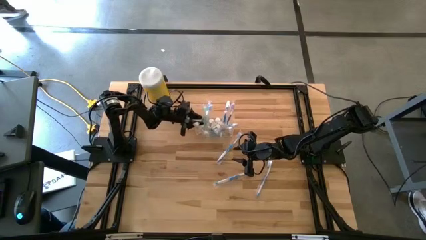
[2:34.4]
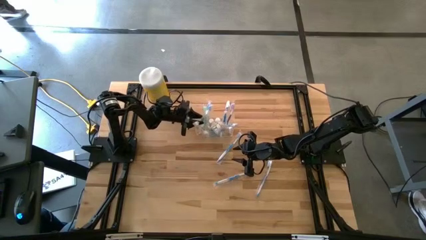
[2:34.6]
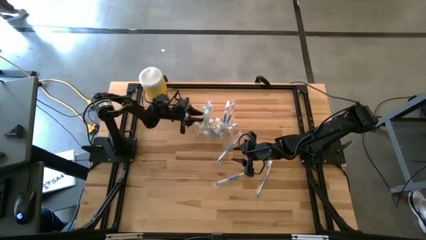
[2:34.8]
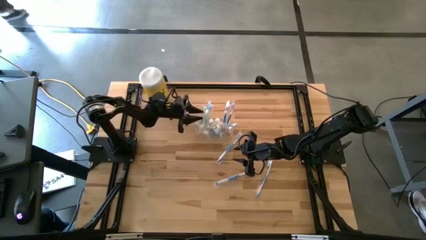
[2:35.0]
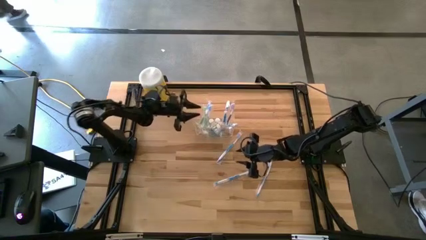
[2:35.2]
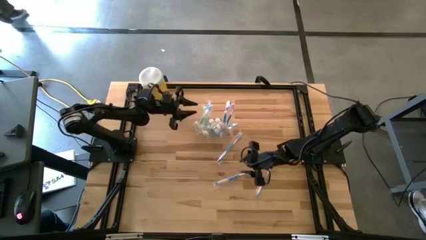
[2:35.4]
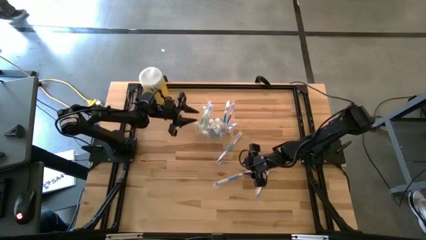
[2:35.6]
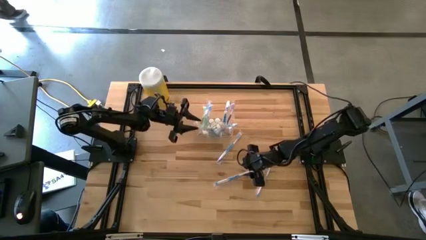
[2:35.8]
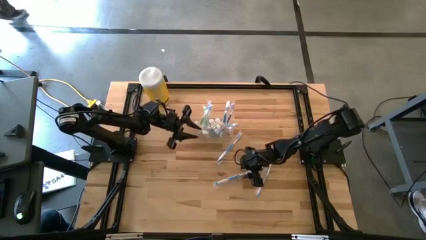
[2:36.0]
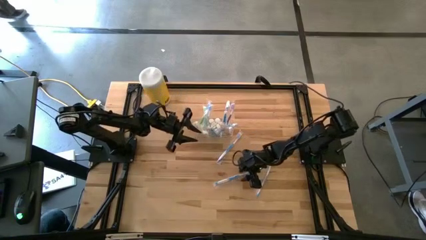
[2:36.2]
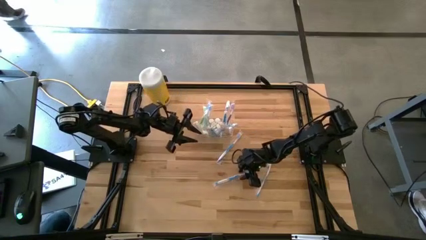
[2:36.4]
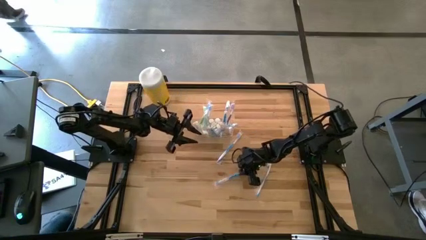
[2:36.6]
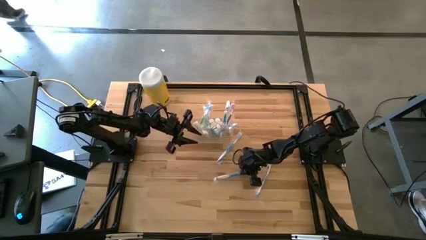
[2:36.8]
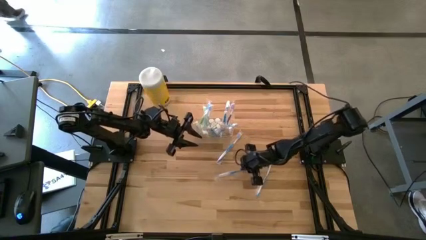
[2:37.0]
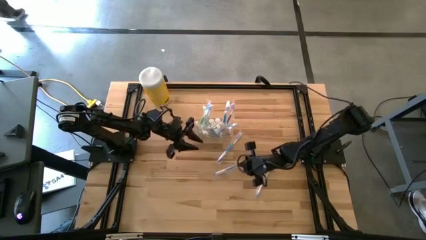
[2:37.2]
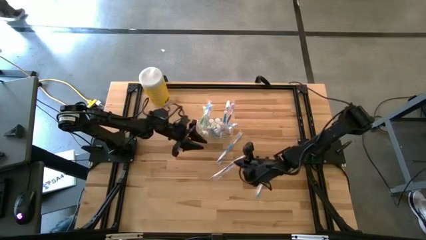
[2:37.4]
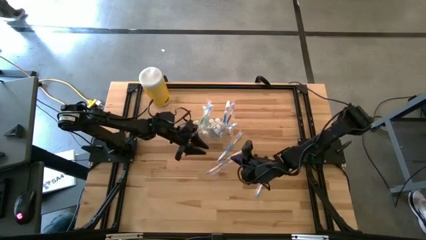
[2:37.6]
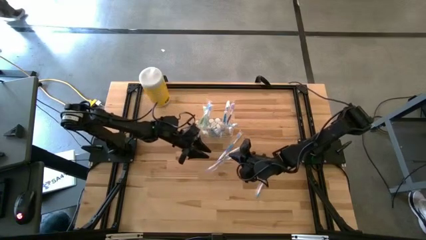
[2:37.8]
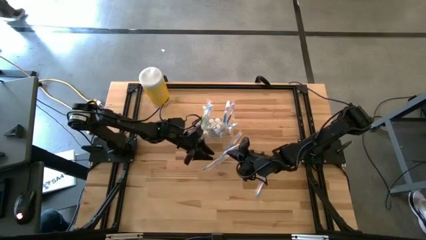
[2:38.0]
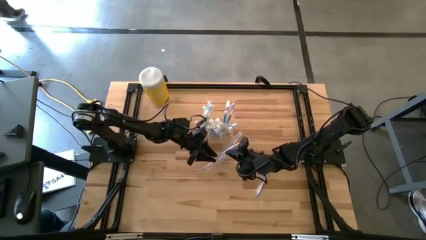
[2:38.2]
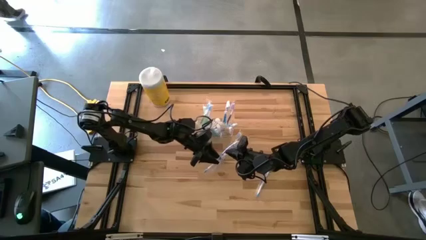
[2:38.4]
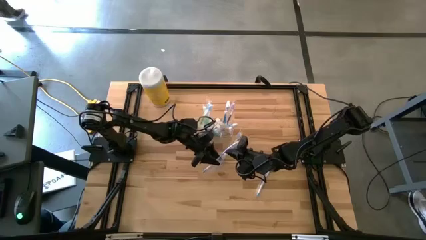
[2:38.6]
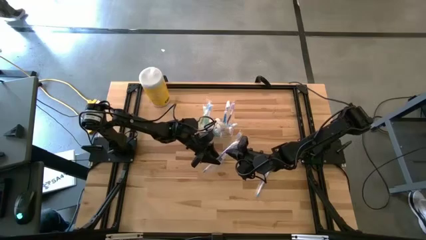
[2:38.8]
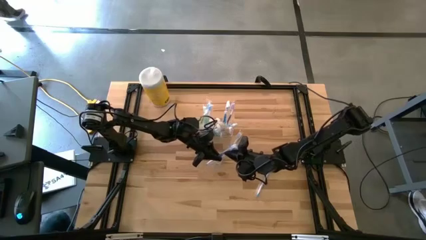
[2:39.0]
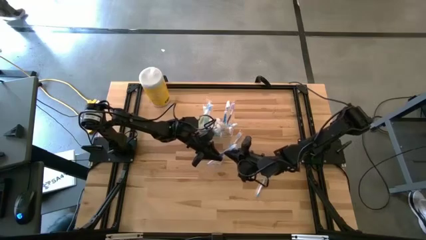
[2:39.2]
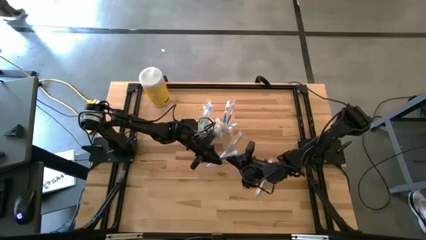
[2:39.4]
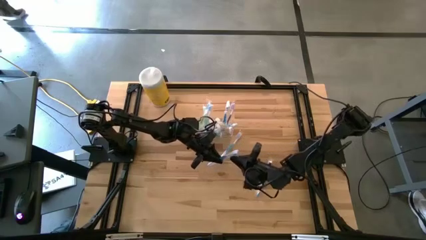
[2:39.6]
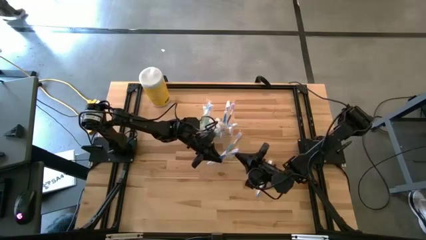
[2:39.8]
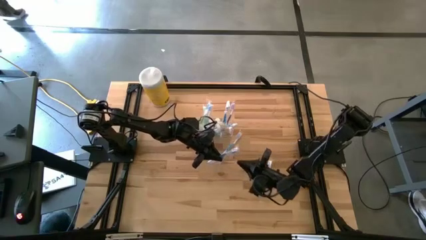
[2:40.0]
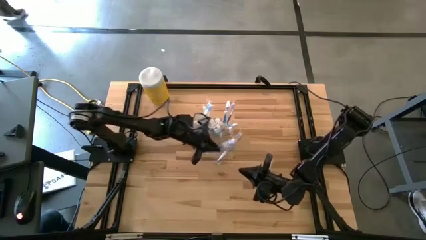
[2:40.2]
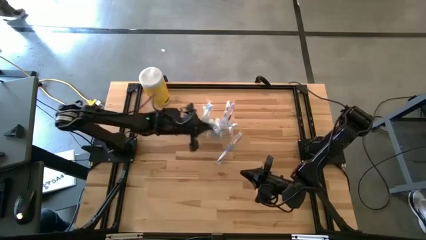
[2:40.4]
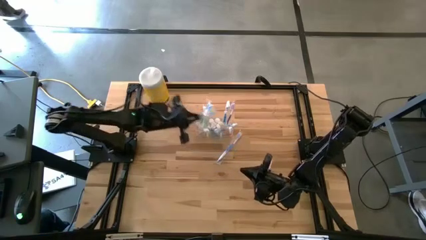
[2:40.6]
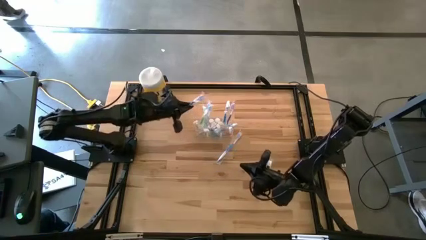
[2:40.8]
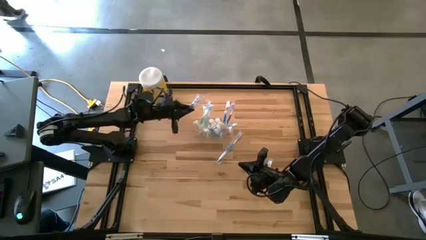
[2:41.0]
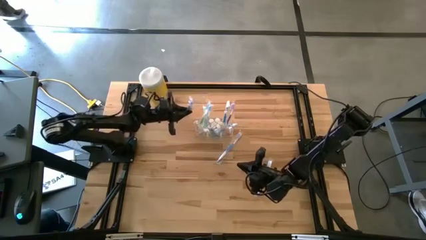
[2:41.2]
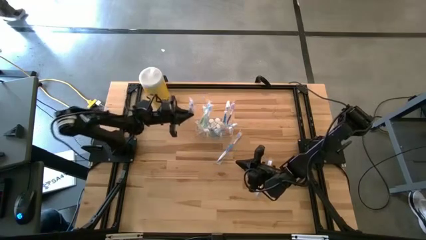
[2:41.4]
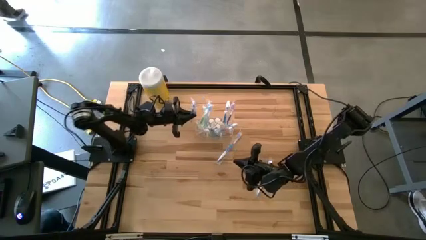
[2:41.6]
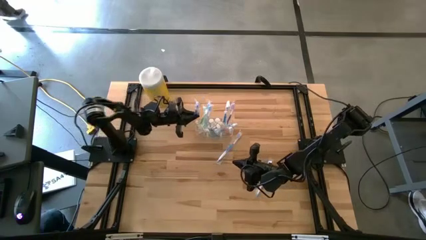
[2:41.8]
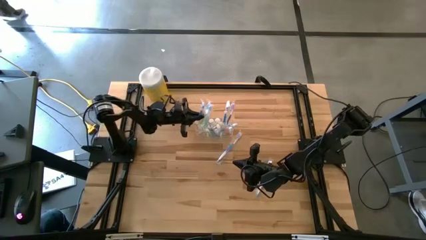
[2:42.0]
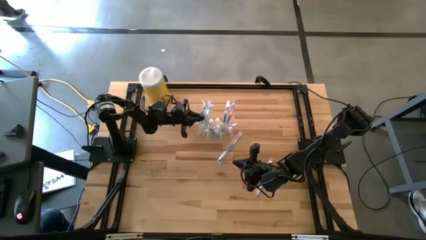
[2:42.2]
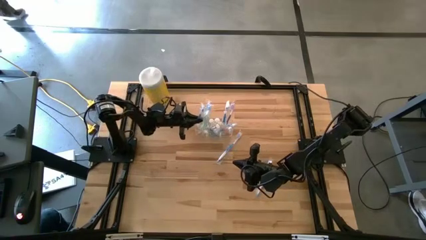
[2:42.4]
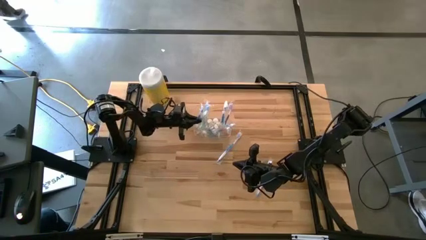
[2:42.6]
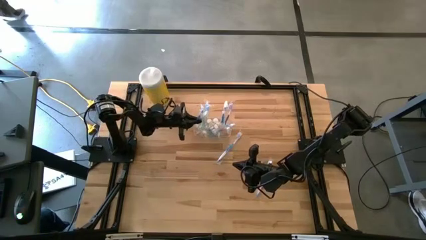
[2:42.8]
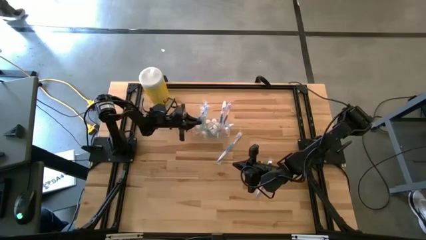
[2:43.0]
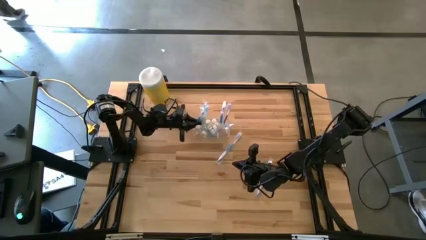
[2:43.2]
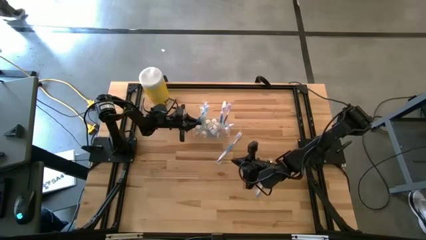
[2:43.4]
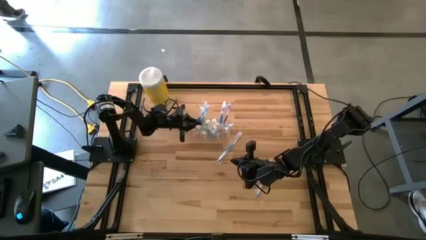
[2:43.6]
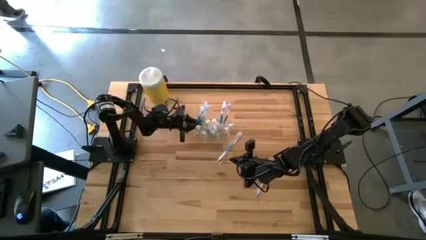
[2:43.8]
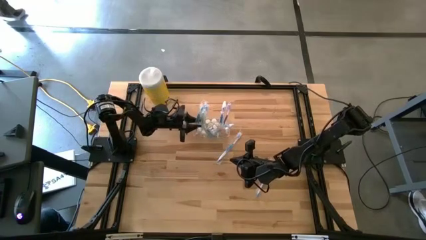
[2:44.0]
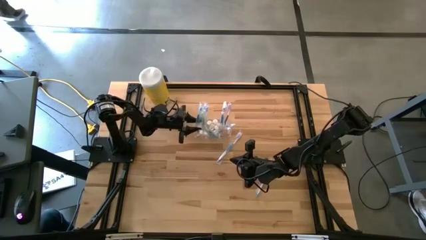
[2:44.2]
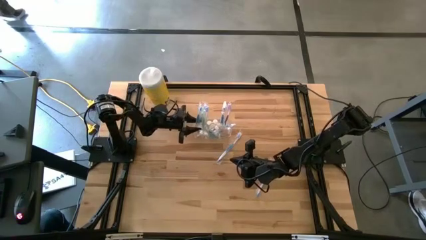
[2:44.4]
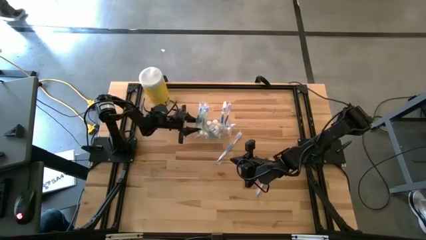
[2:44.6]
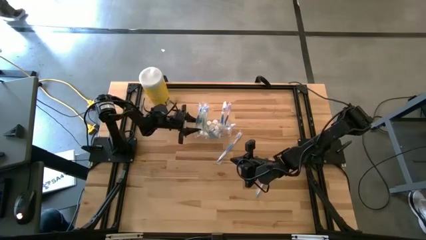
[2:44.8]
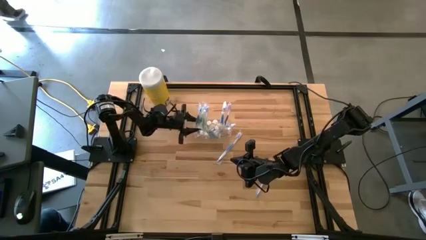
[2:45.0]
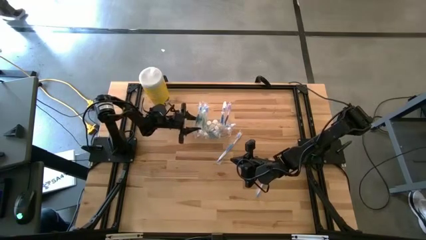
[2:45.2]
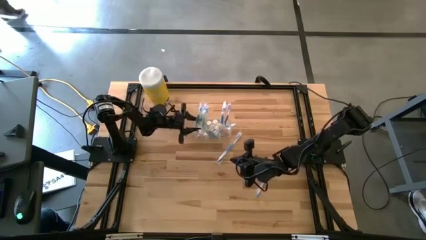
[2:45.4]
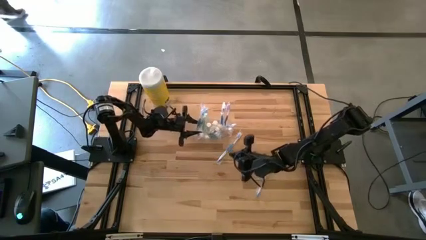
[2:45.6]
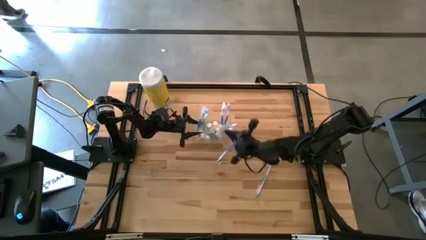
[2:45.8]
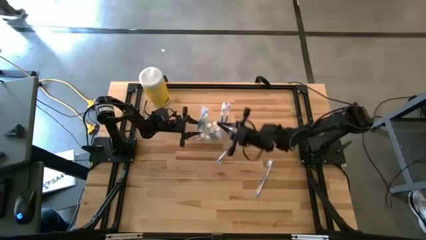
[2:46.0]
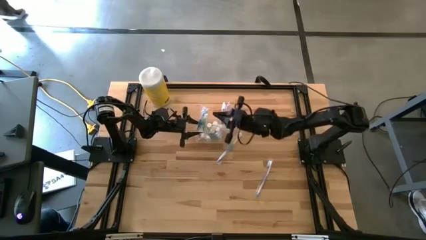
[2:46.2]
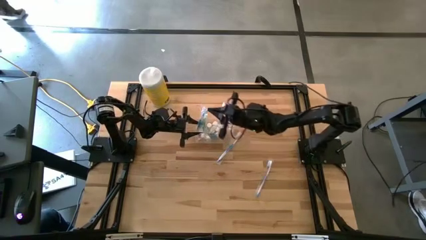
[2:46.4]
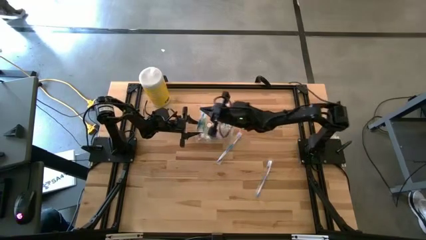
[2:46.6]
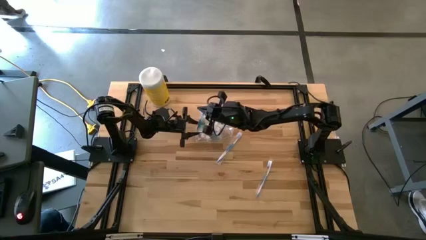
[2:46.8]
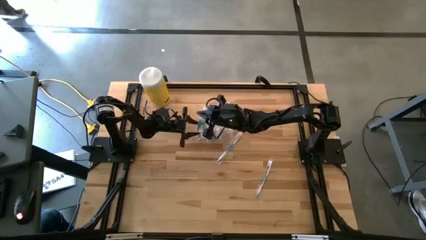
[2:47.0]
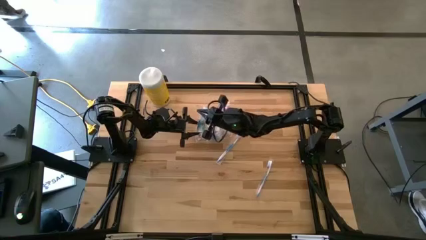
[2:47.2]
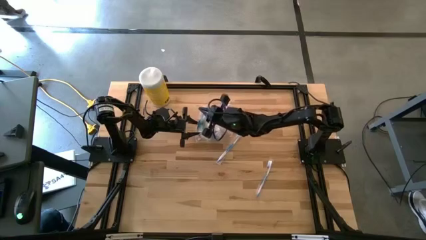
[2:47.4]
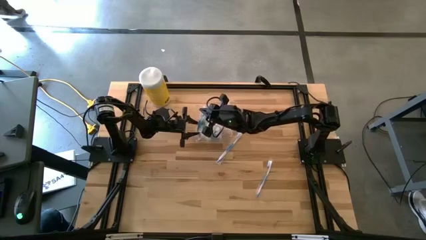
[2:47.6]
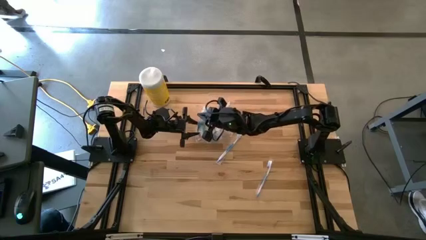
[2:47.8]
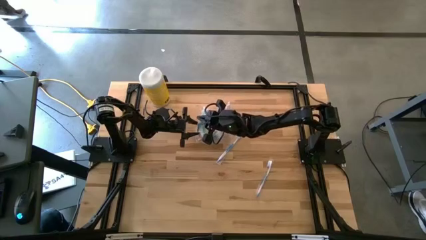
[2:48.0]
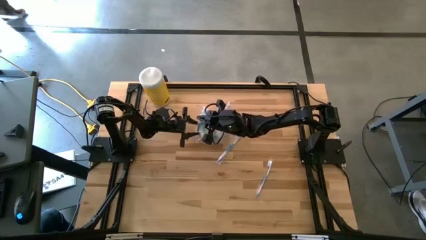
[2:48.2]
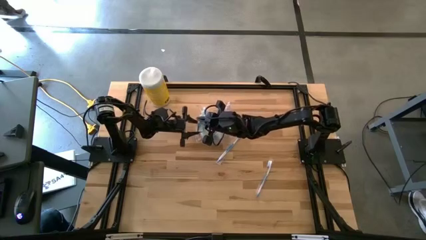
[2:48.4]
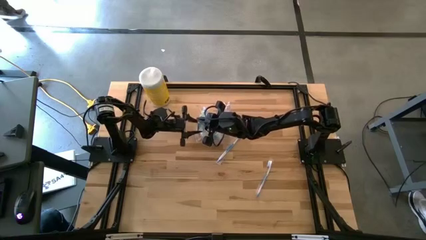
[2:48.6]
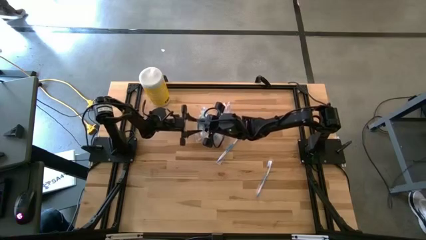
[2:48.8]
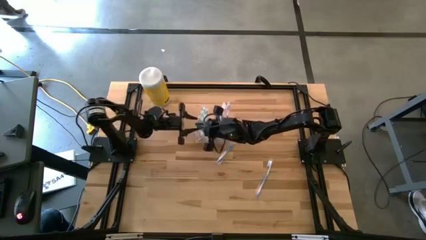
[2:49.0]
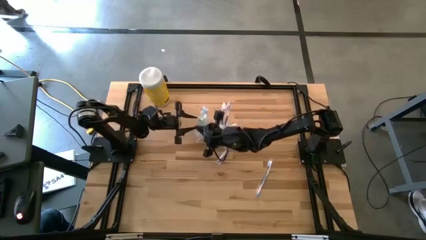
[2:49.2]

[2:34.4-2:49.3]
Task: Pick & Place toothbrushing station
Put the blue toothbrush into the transparent organizer

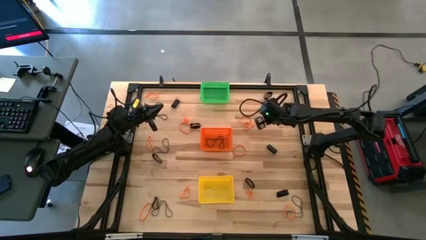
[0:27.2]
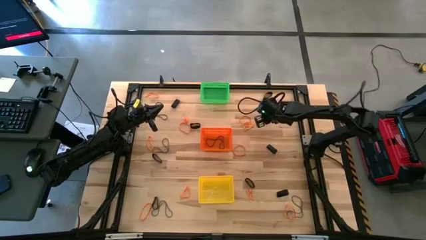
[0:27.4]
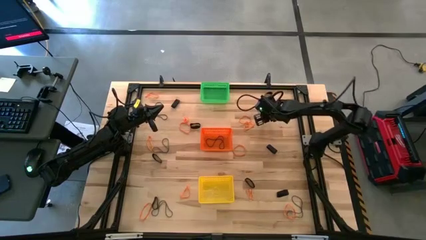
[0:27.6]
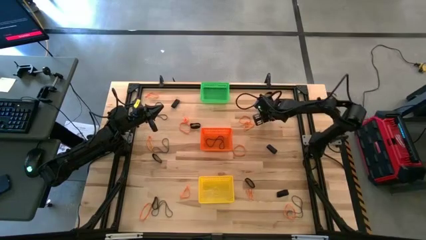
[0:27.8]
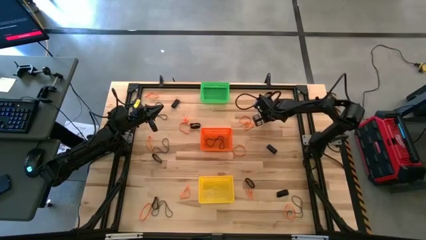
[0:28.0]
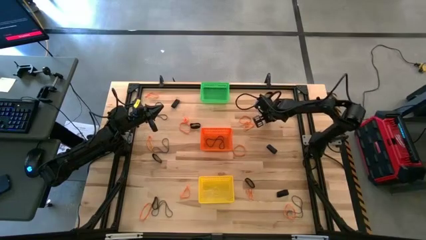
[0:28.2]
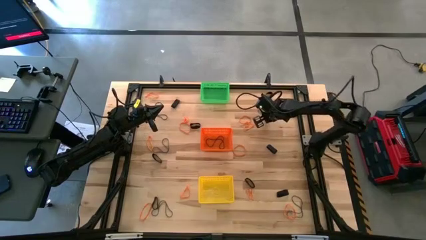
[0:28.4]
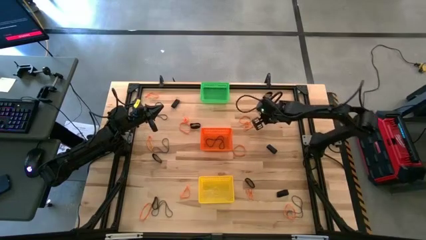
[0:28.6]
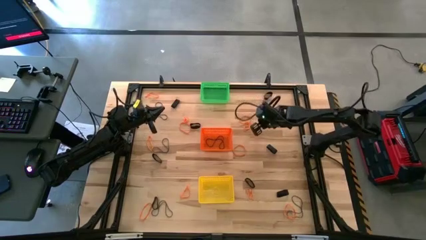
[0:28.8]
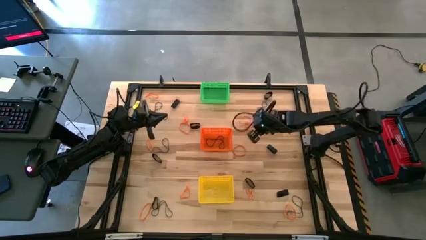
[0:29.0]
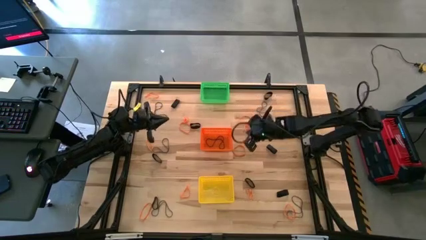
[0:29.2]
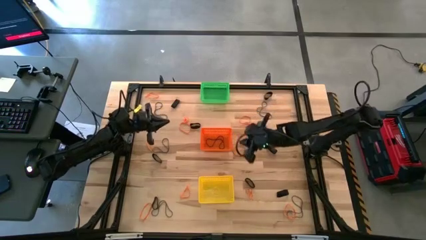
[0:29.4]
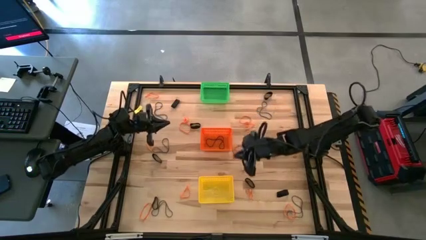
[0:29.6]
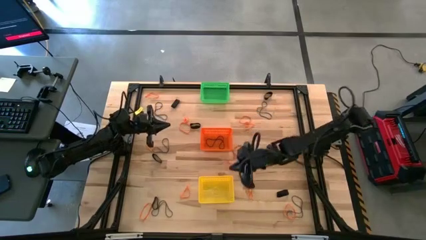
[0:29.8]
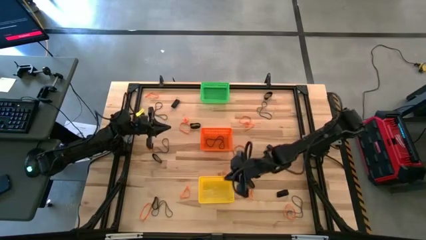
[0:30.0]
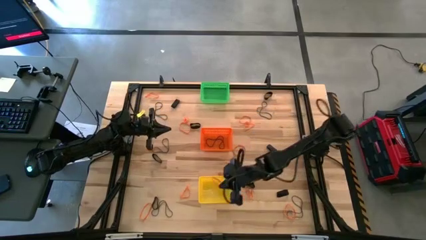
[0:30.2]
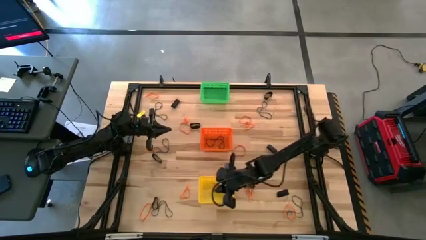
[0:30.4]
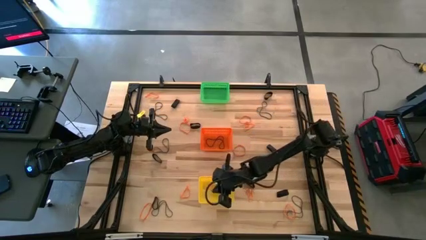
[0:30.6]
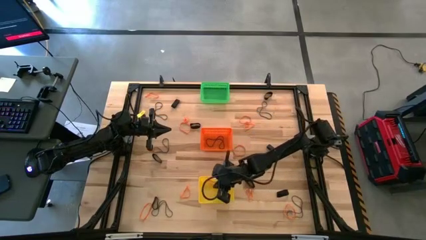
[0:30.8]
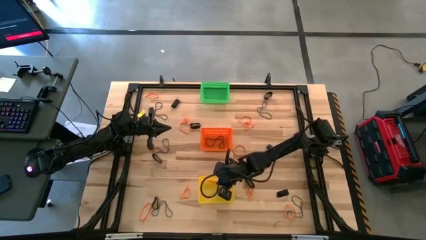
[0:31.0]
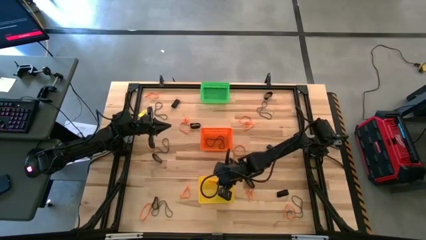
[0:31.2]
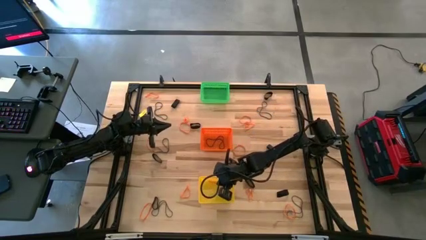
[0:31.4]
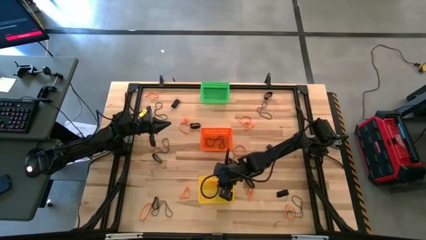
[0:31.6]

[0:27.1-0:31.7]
Task: Sort rubber bands into baskets
Put the orange rubber band into the yellow bin
